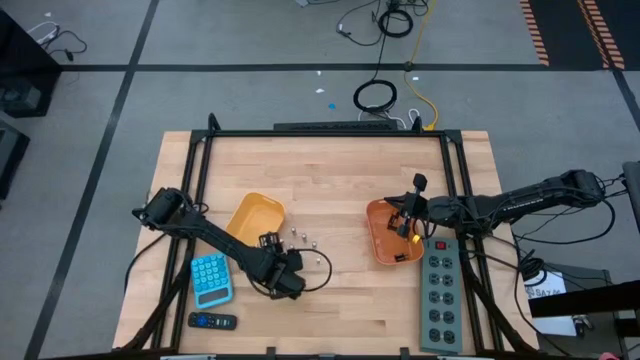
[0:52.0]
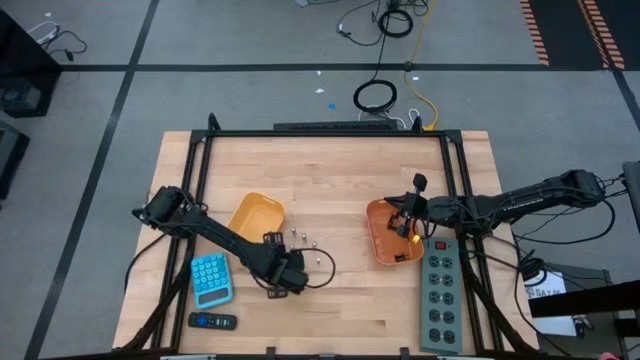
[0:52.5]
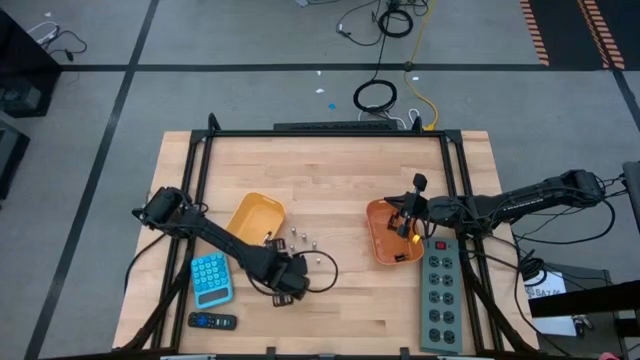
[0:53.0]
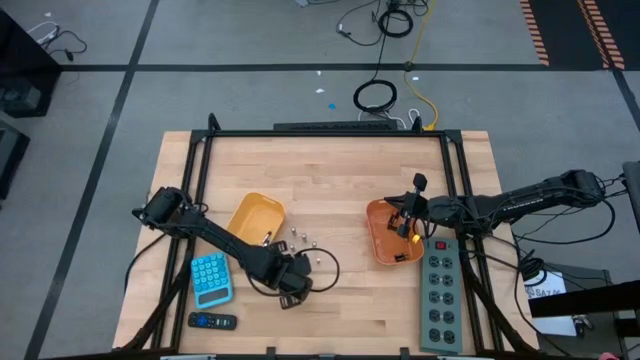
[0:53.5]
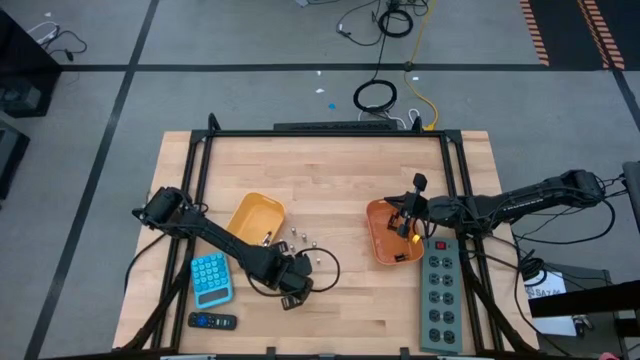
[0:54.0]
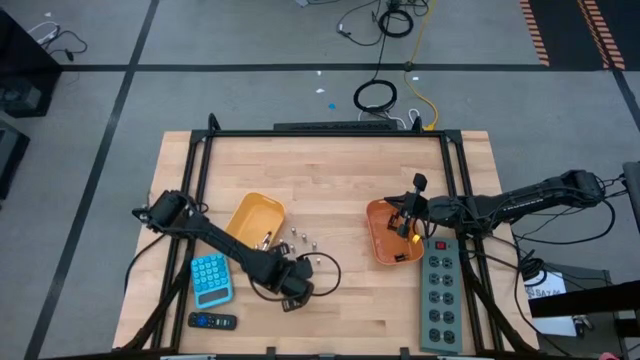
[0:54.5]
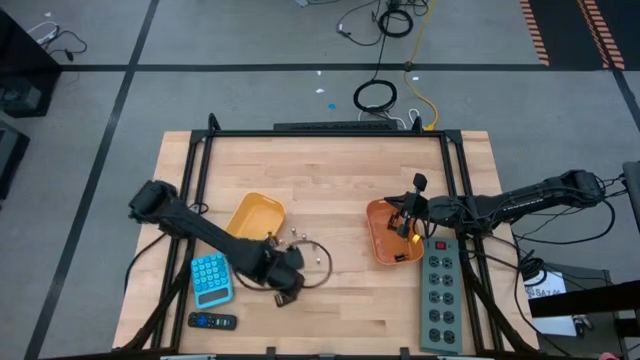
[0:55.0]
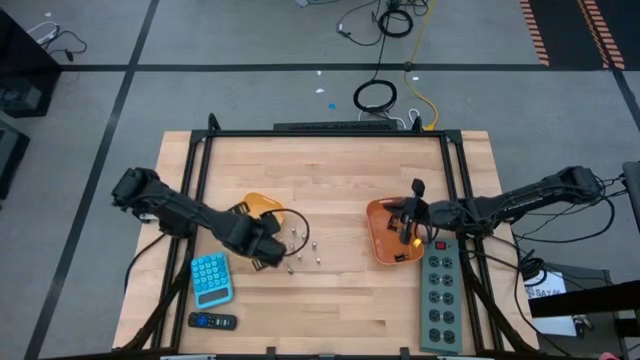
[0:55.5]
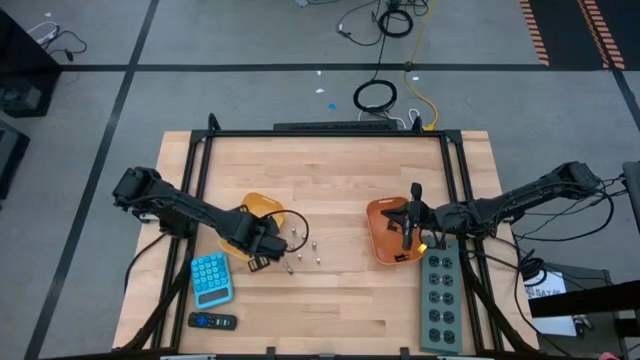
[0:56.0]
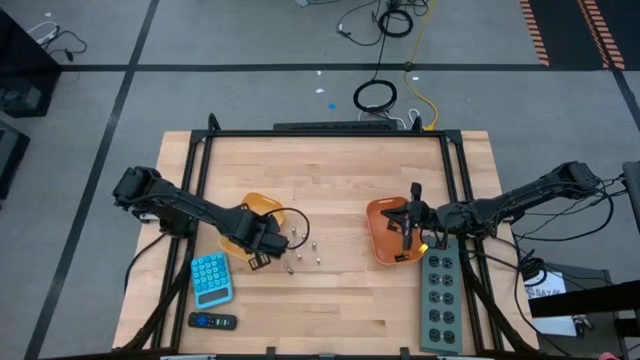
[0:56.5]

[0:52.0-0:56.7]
Task: Sort batteries
Put the silver battery into the yellow bin

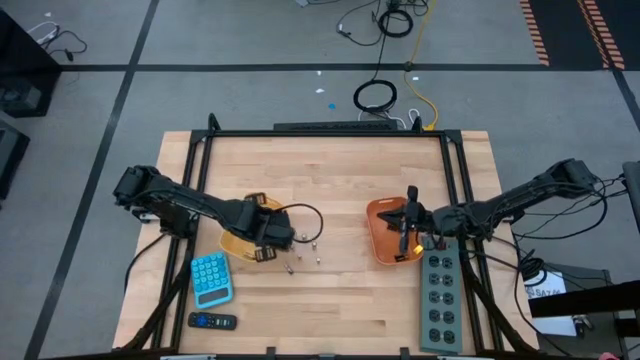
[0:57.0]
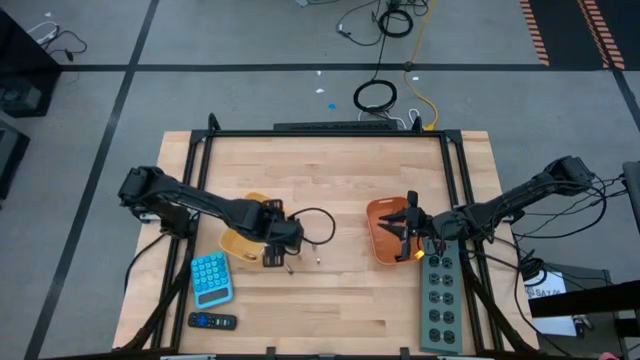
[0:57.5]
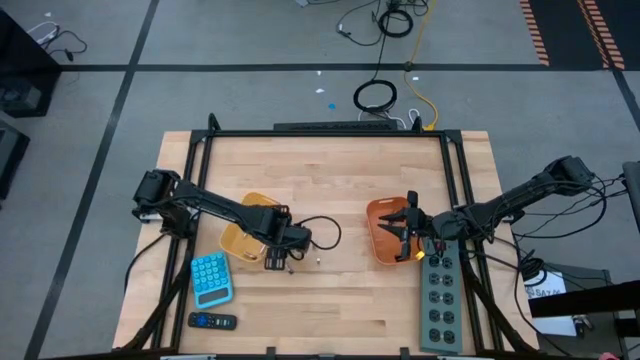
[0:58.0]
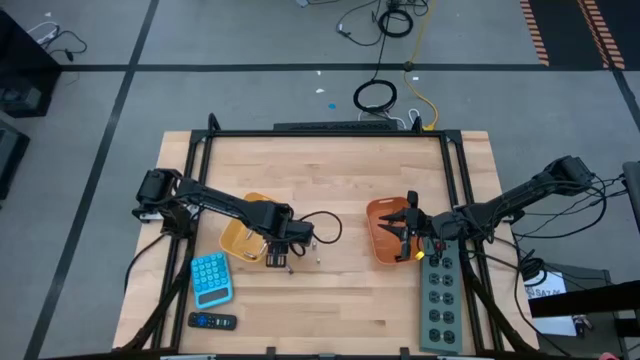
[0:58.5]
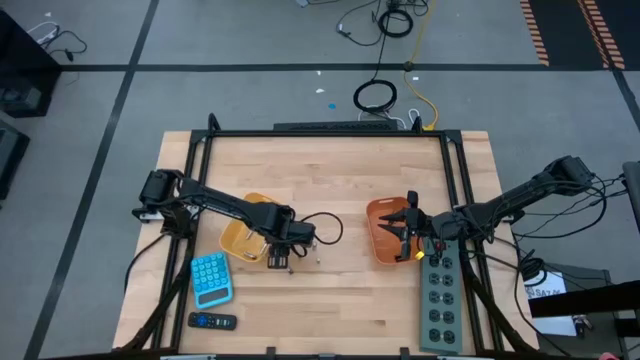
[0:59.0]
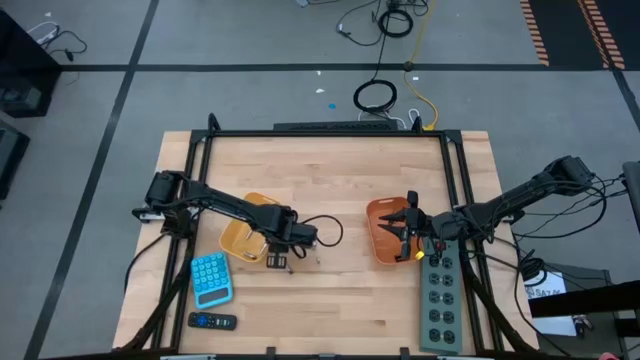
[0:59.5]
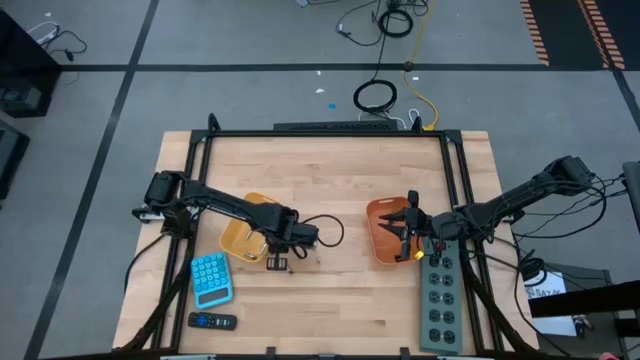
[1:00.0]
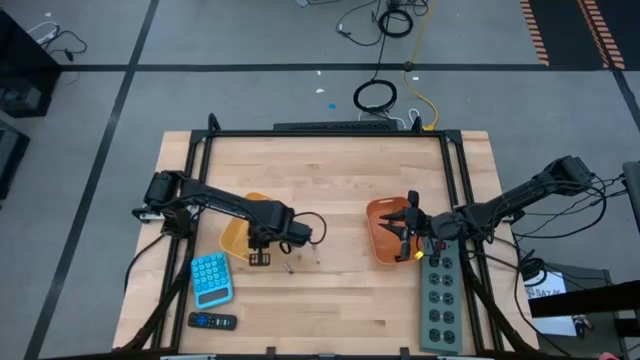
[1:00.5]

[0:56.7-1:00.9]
Put the silver battery into the yellow bin

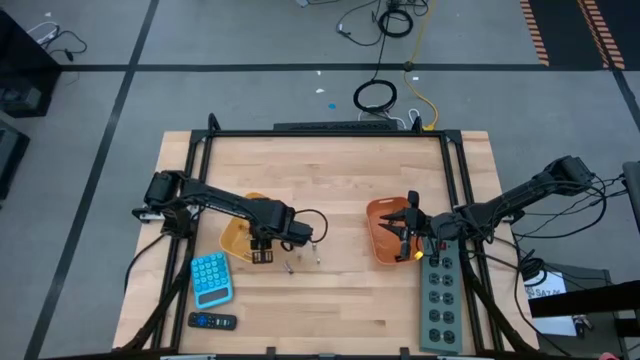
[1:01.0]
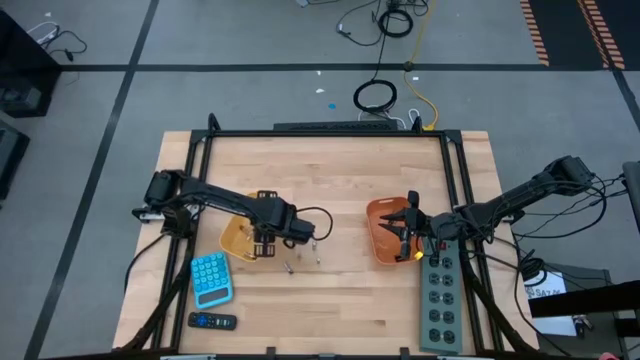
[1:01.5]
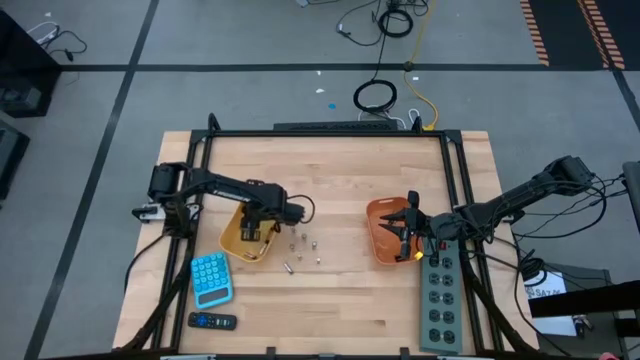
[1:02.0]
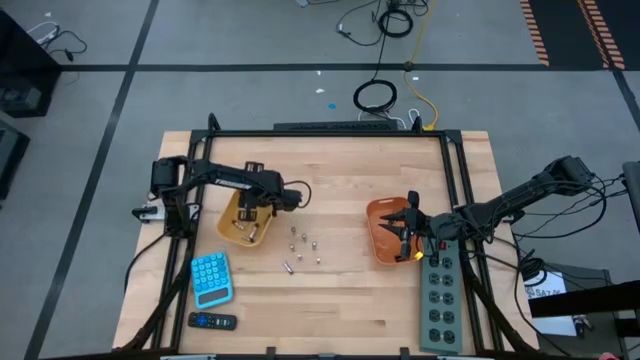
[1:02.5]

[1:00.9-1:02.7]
Adjust the yellow bin

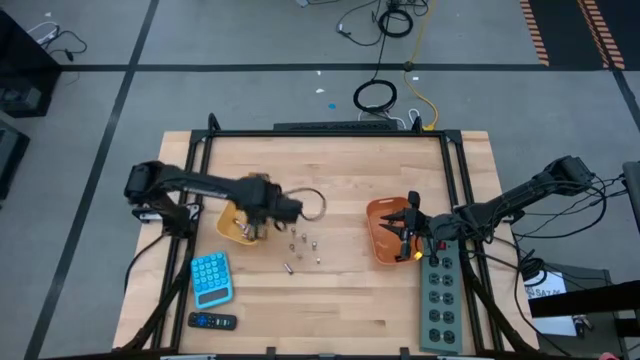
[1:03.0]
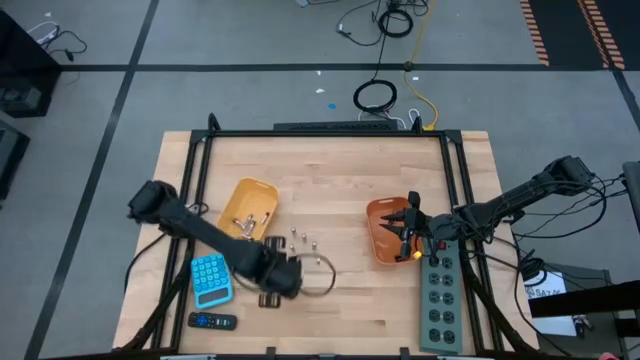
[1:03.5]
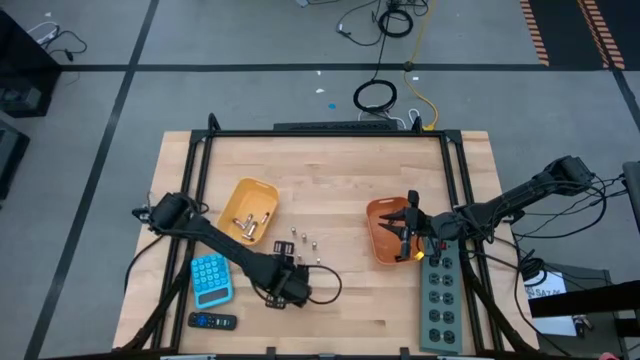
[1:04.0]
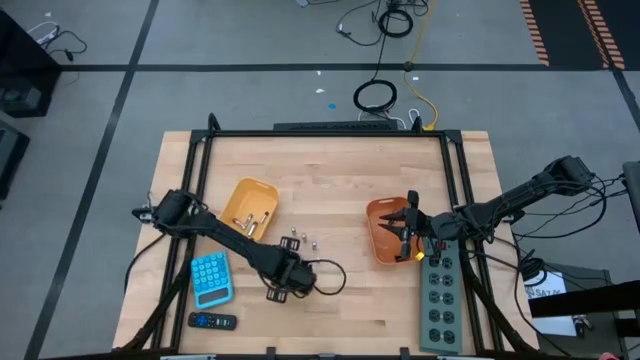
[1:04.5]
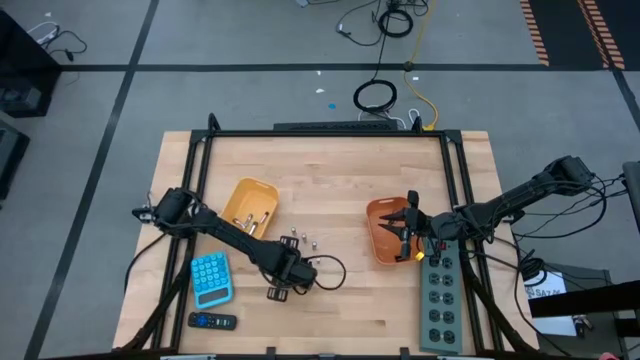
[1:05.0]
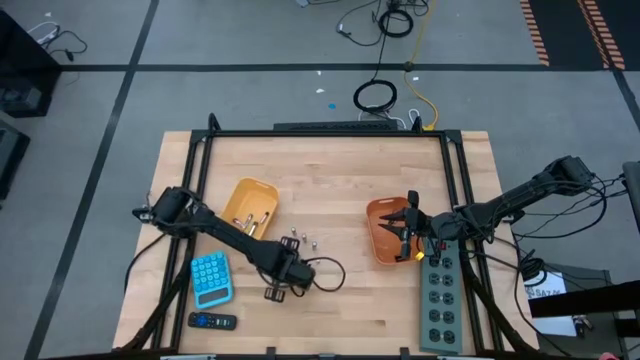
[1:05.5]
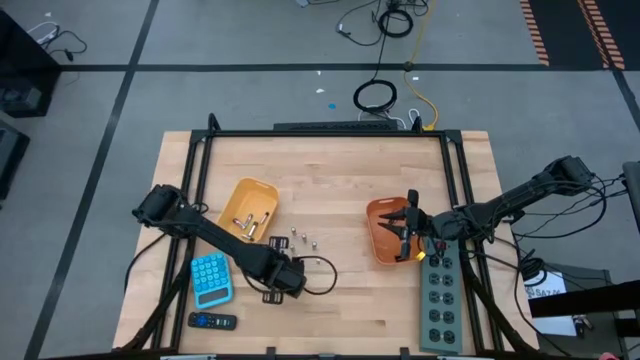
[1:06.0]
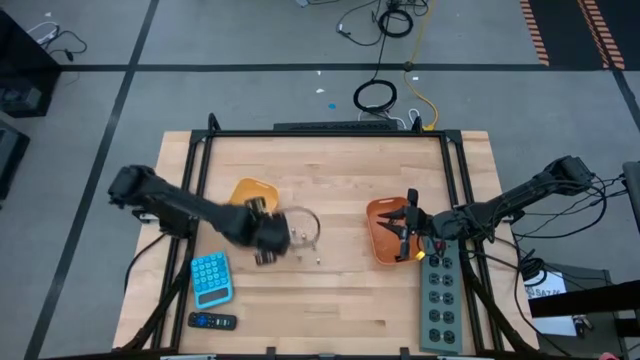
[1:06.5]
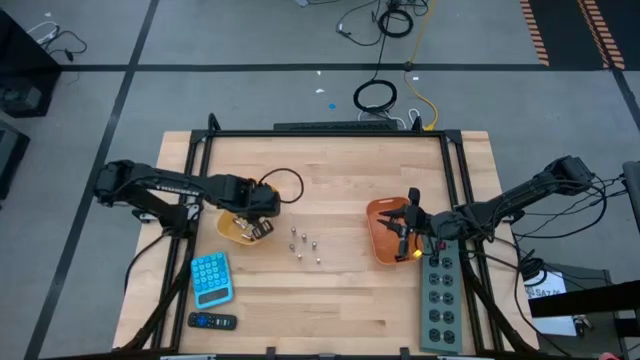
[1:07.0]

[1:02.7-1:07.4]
Put the silver battery into the yellow bin

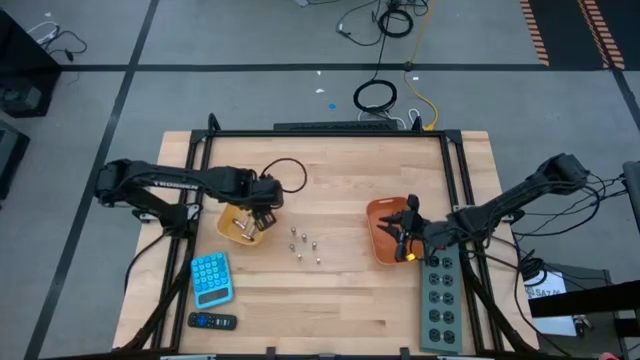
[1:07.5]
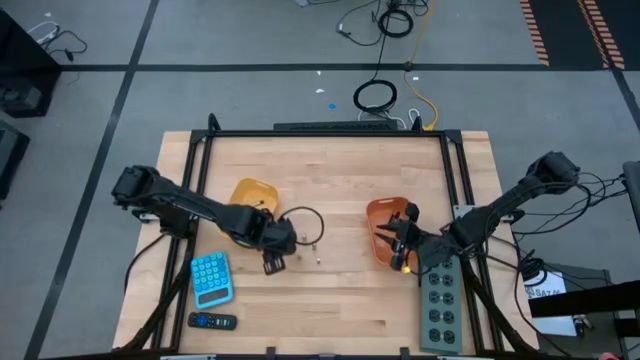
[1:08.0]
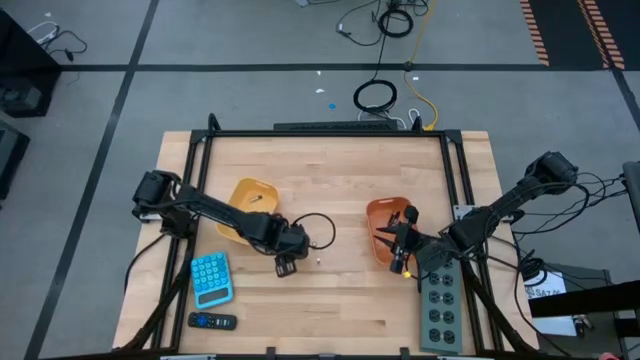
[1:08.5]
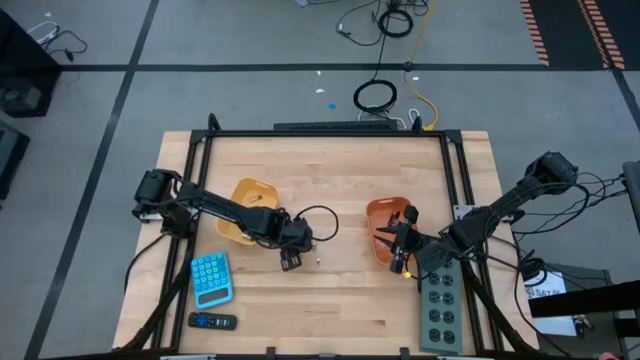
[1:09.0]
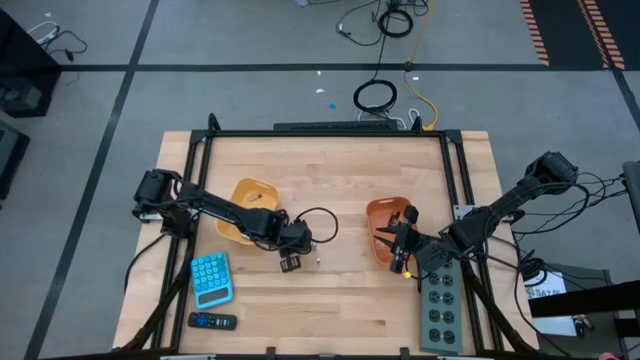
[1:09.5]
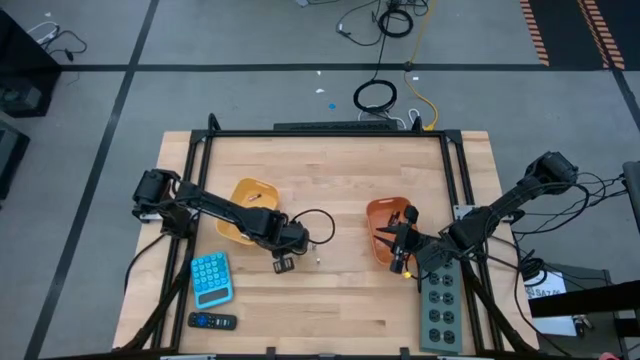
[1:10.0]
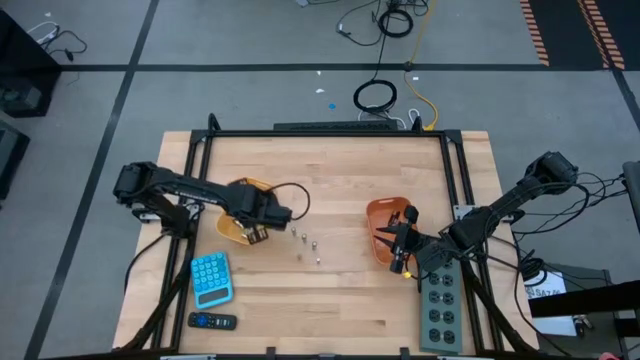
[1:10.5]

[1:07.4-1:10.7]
Put the silver battery into the yellow bin

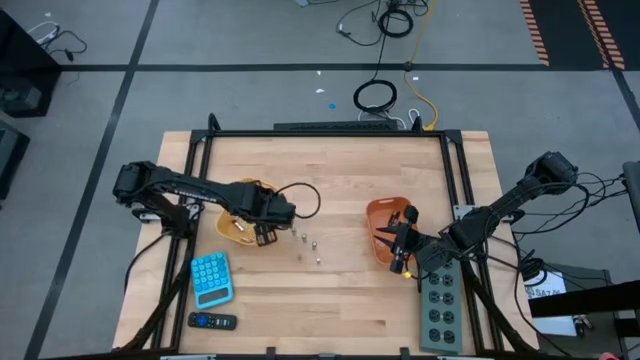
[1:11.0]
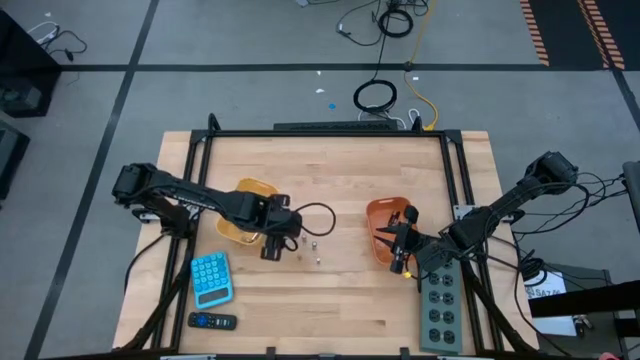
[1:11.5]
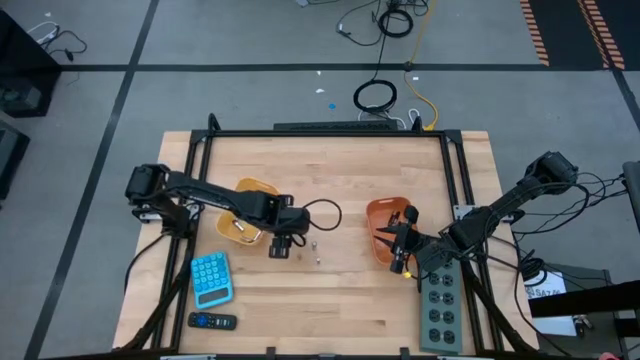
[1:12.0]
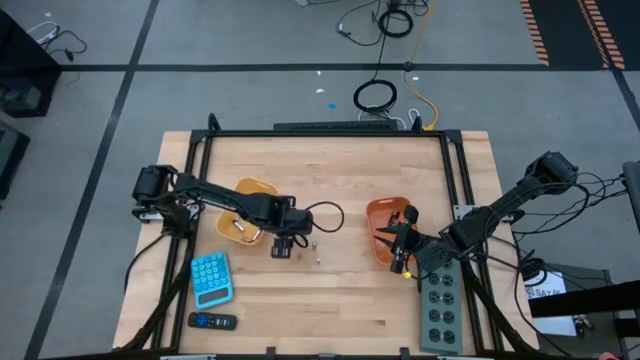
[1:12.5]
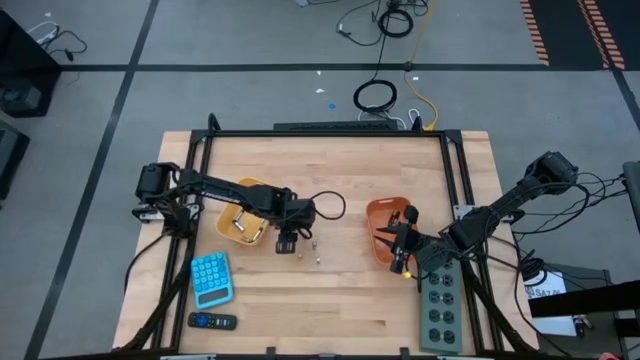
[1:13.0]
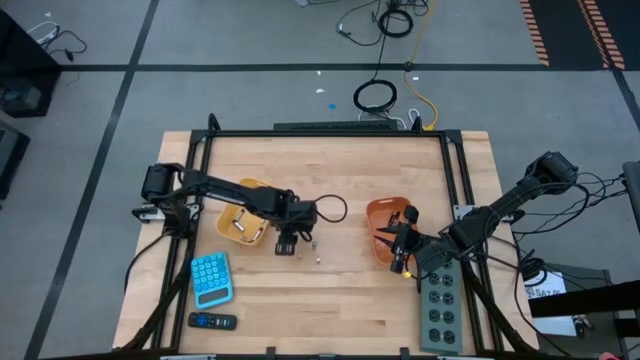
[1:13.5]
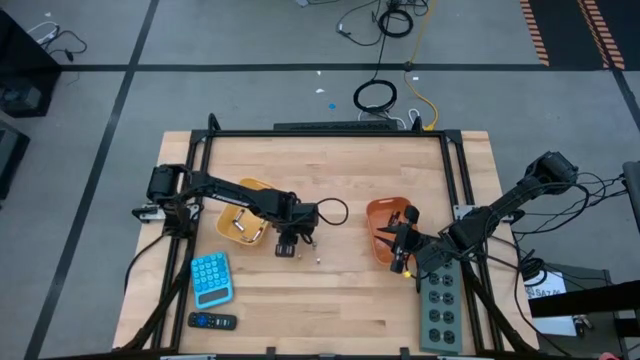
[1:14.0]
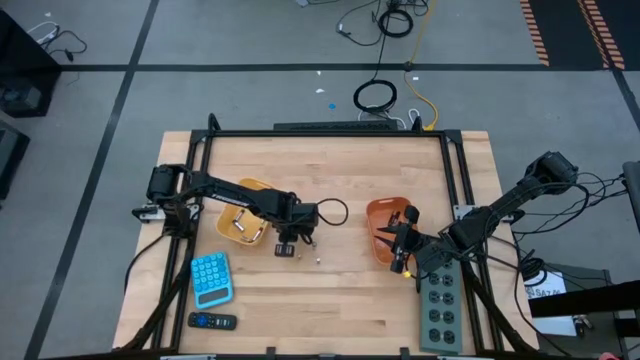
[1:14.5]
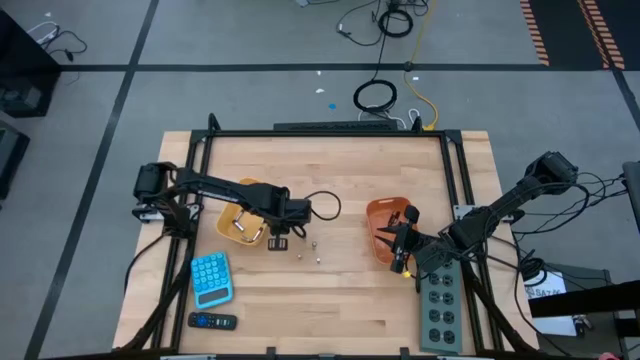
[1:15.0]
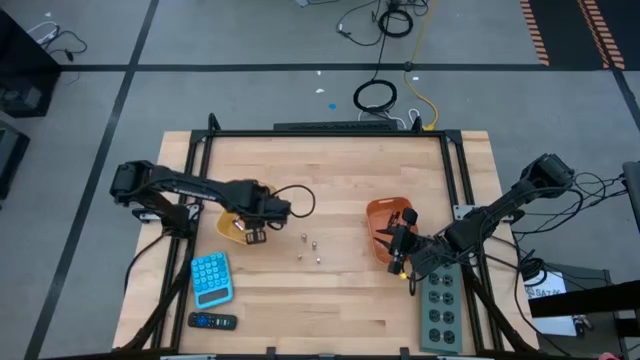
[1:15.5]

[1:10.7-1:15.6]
Put the silver battery into the yellow bin
